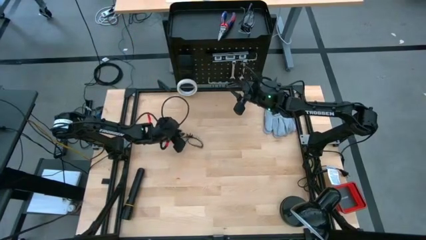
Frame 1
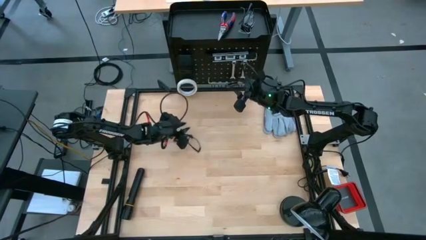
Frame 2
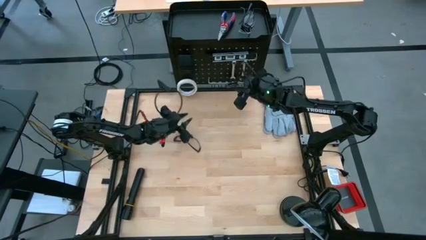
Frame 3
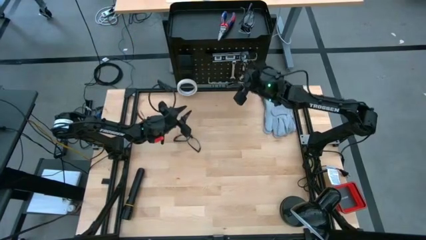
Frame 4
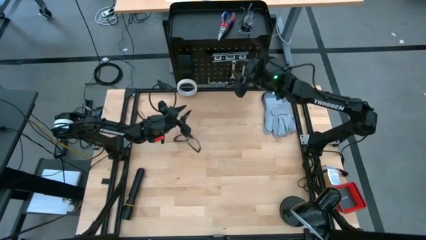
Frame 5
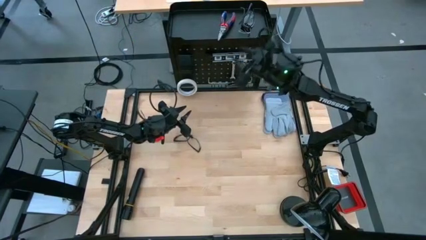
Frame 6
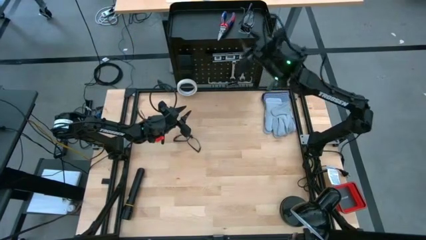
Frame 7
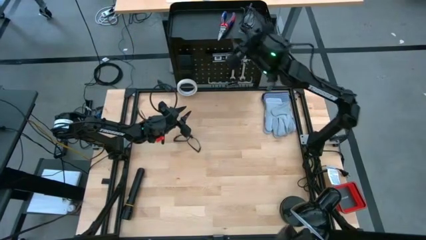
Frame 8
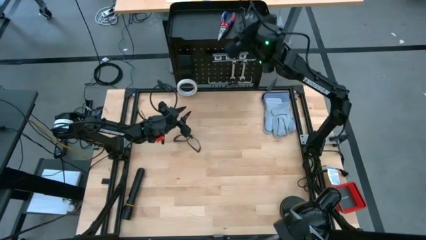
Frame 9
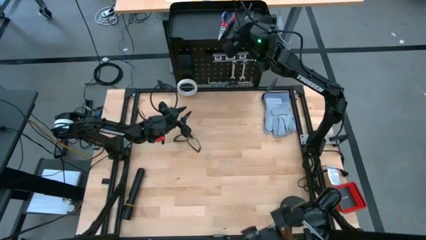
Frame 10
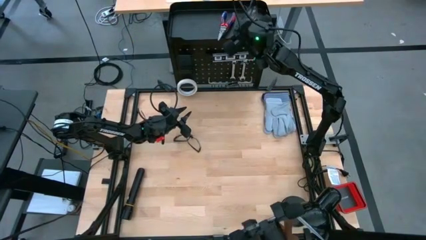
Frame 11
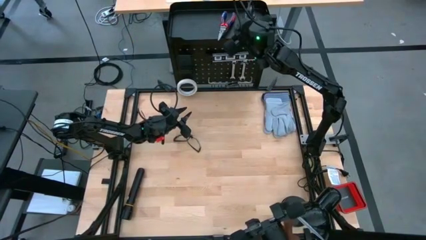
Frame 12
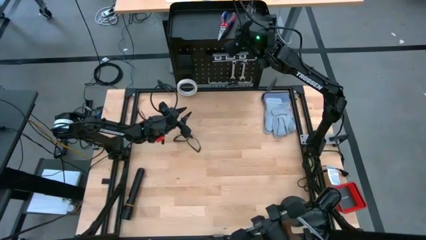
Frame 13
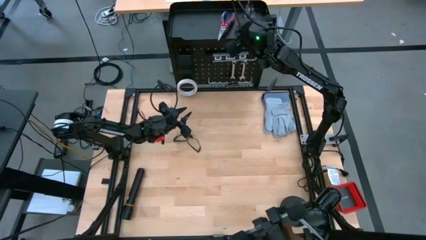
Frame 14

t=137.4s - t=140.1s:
Task: Hang tools onto peg board
Remove the black safety glasses from the black pegboard

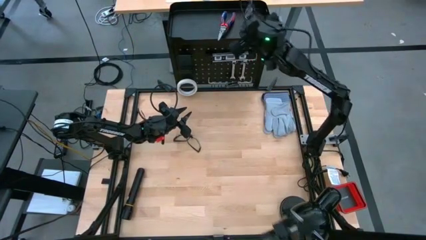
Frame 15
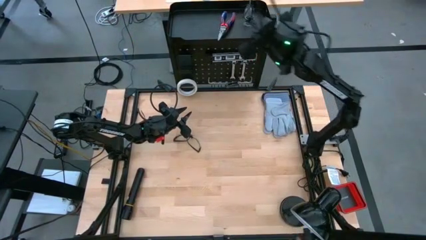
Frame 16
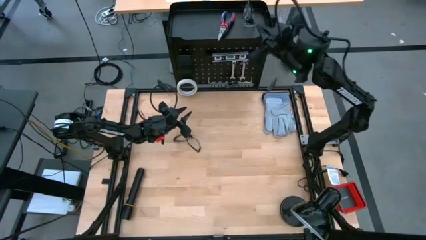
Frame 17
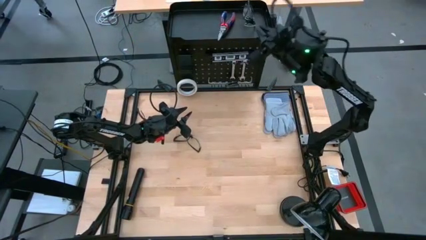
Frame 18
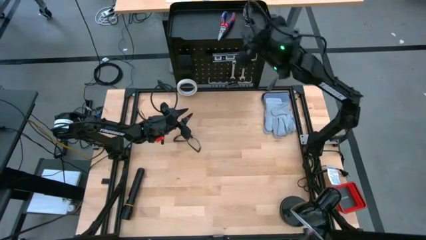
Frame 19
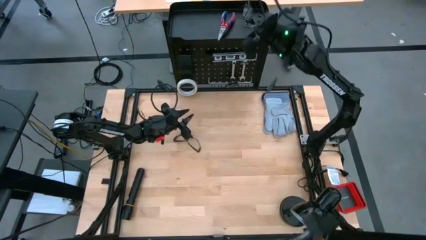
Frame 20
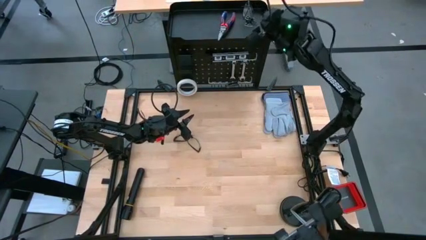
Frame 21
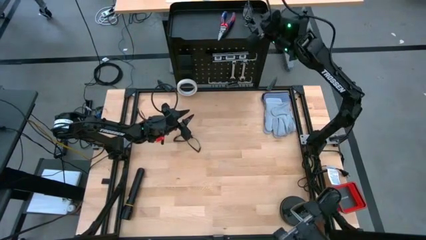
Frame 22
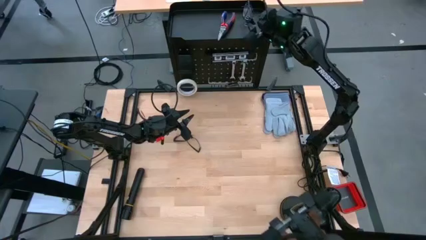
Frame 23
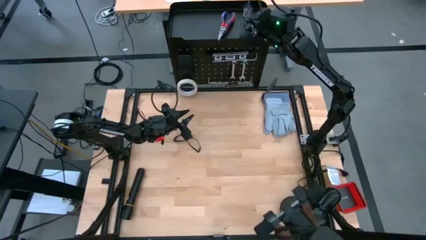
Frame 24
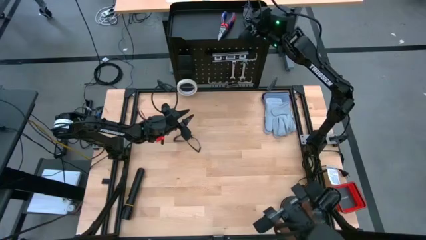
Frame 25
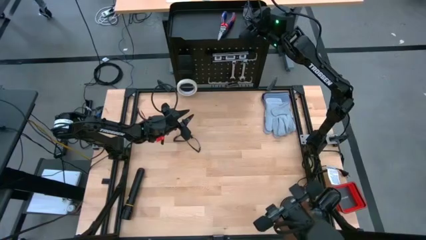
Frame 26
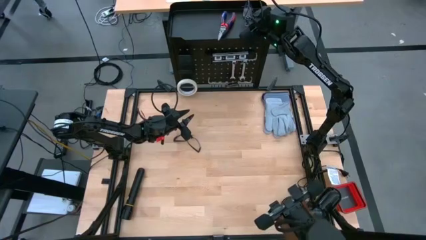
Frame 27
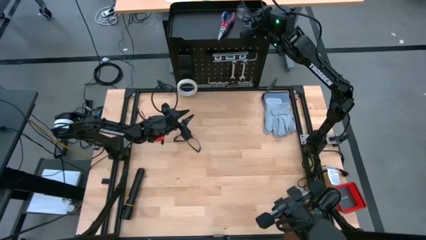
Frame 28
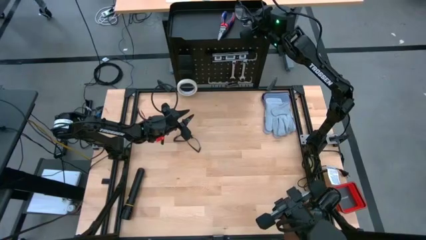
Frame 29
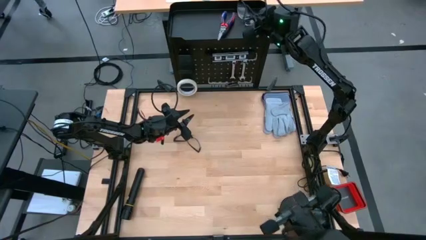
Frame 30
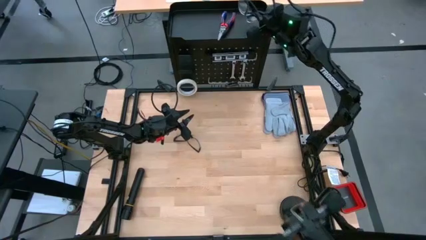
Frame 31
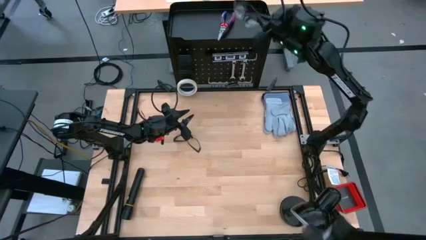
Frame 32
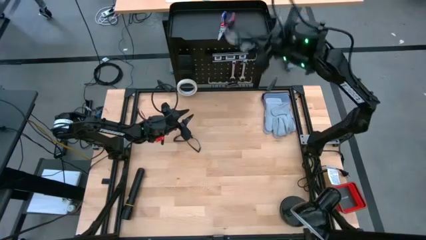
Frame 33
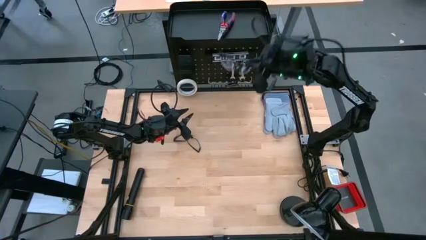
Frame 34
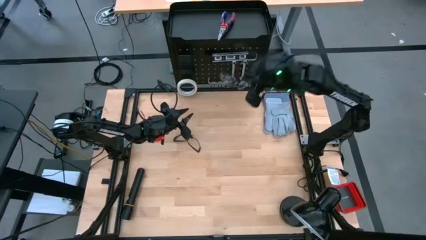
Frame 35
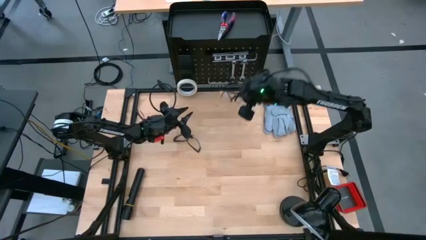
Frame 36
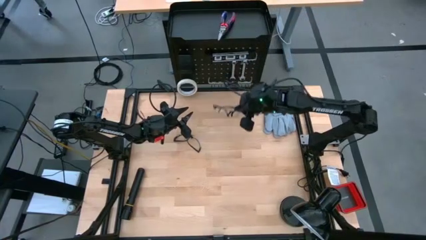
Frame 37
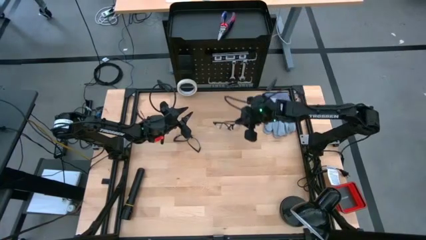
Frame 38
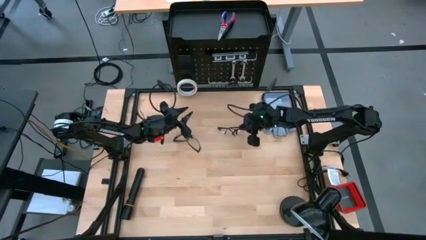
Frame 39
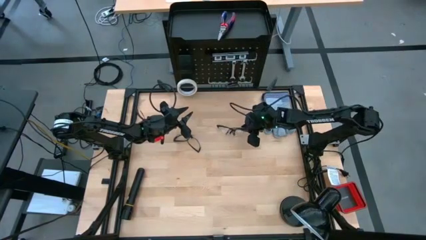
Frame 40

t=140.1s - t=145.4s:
Remove the black safety glasses from the black pegboard

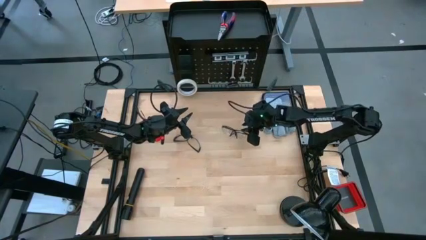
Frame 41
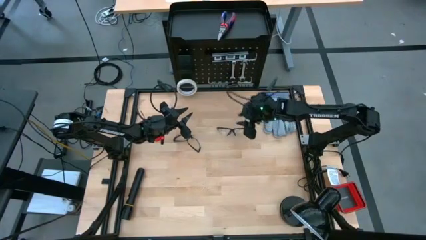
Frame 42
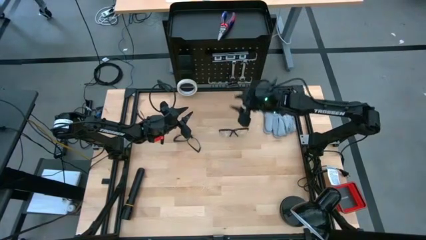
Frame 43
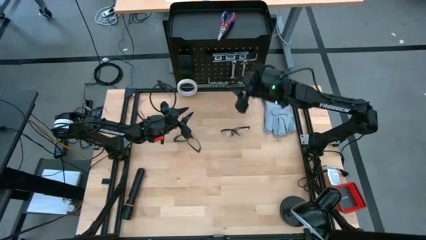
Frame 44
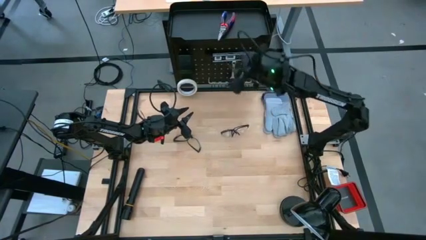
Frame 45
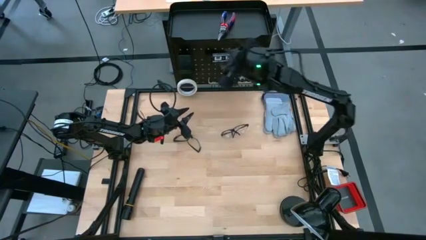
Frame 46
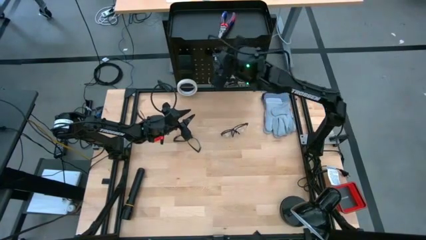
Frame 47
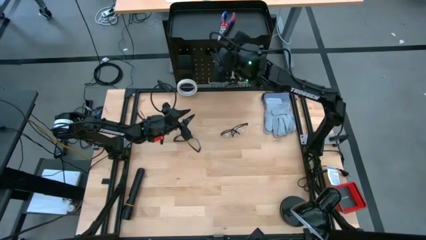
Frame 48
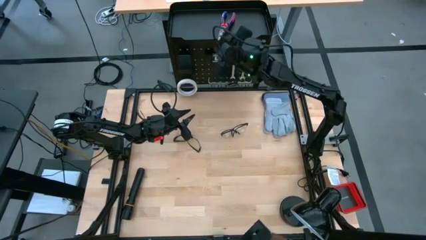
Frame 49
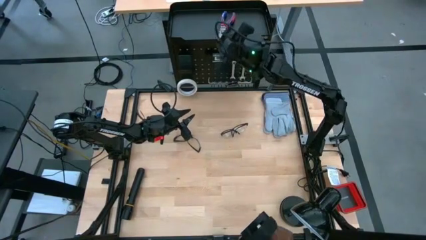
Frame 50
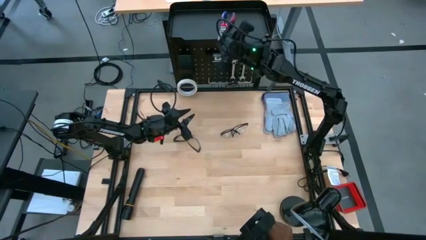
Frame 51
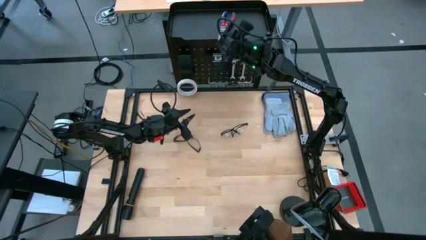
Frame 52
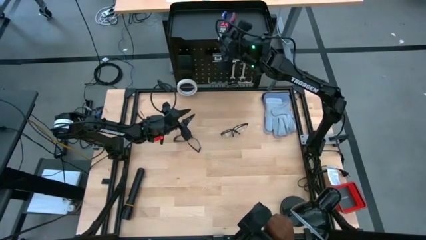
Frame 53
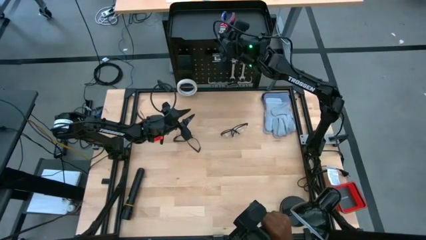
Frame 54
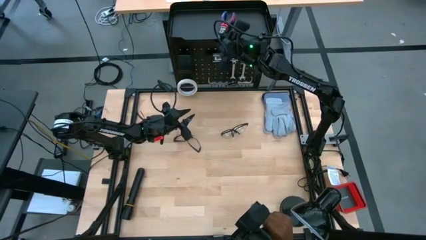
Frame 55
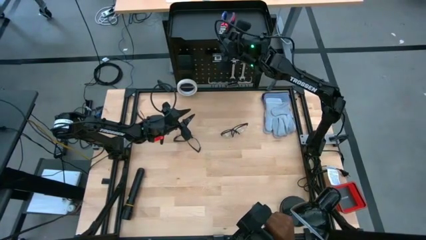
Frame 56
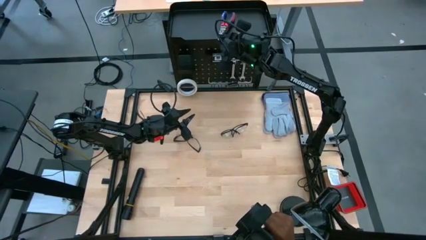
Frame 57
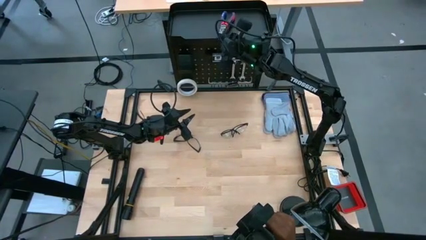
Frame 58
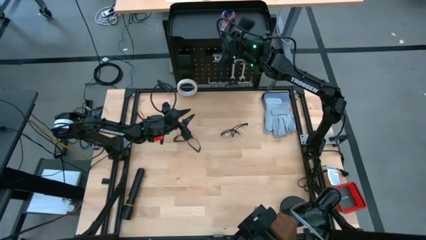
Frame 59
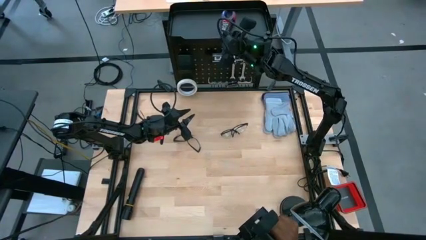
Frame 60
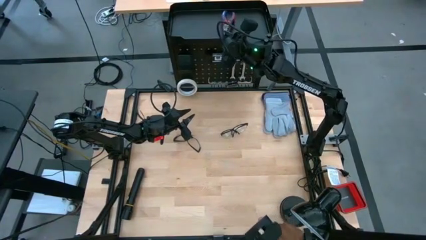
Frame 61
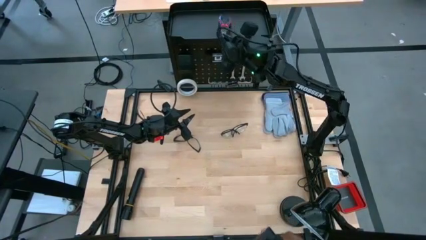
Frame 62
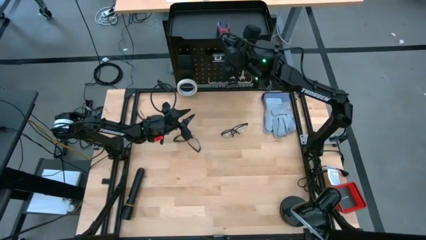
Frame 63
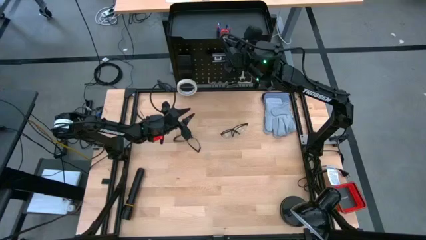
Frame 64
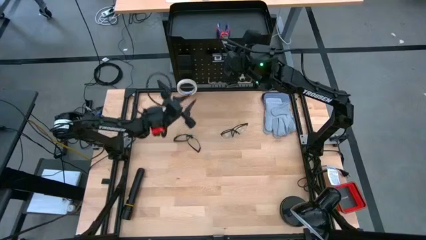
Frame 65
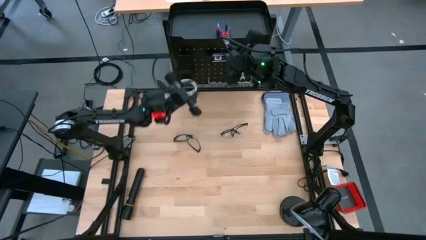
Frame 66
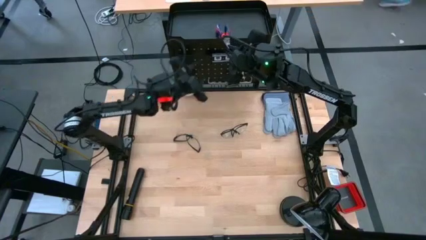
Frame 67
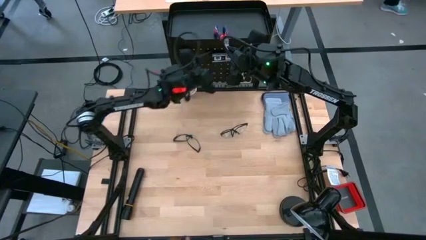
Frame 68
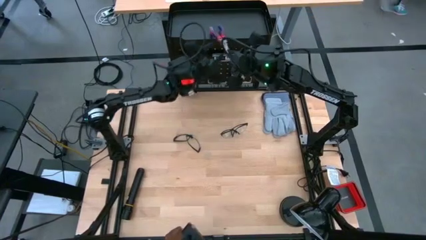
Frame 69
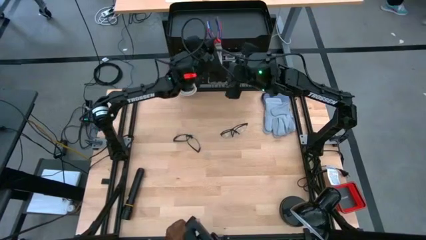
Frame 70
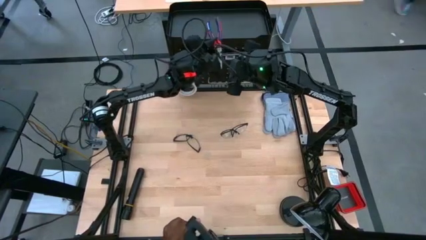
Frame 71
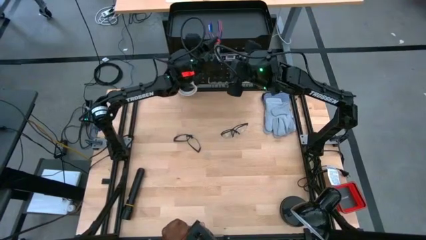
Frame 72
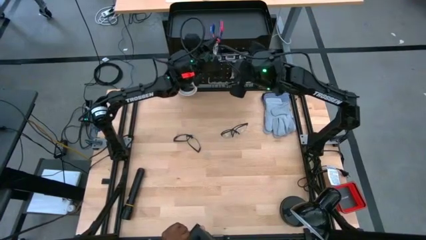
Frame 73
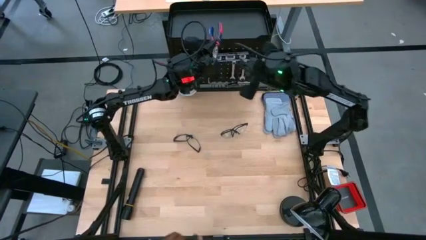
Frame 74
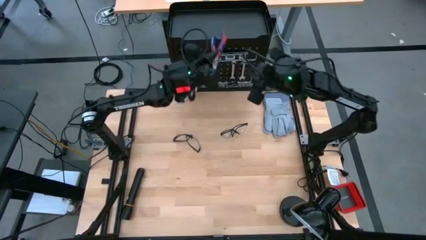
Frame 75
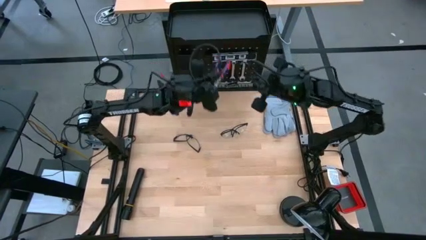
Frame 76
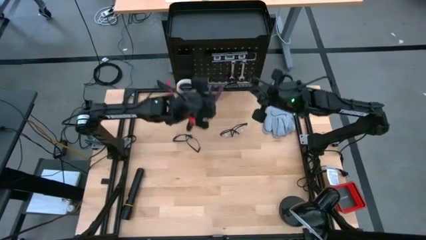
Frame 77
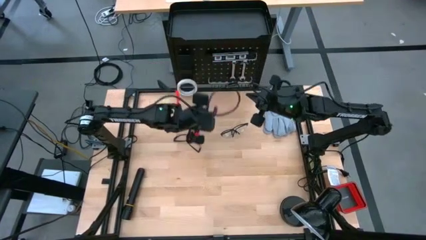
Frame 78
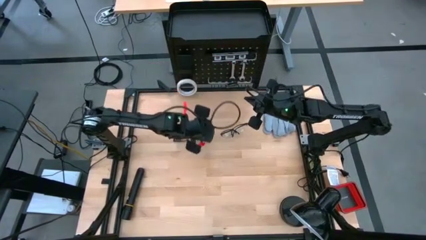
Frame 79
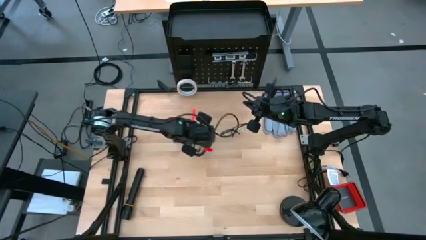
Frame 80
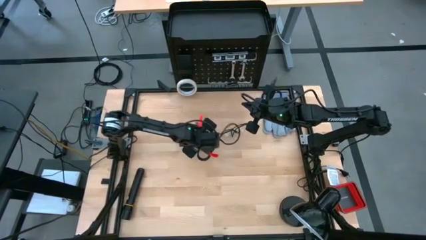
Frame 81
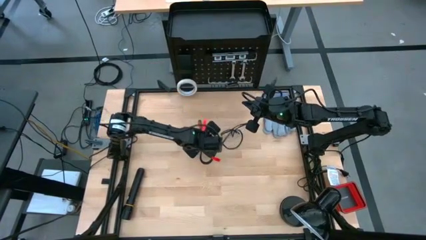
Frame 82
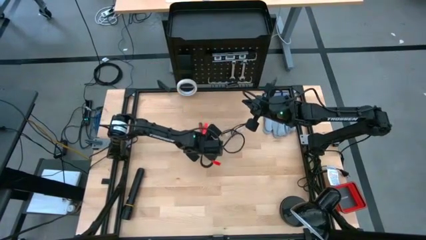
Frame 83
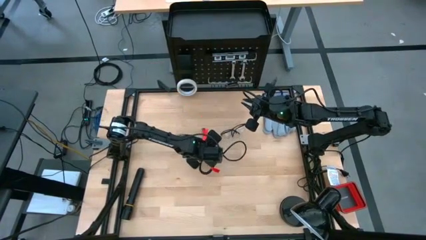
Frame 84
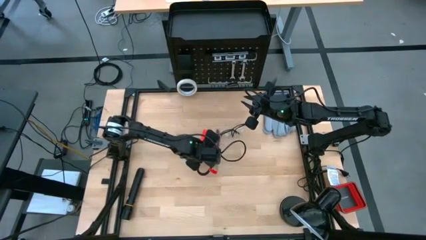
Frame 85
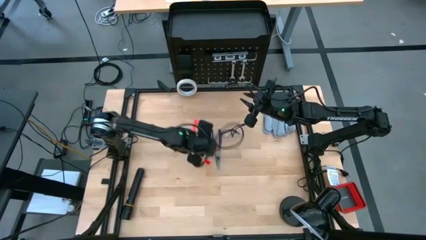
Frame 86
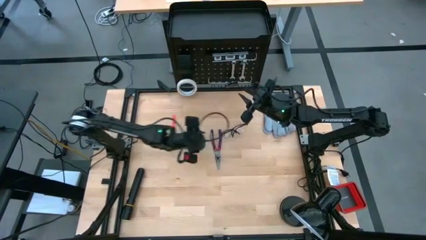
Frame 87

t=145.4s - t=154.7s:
Remove the blue-orange pliers from the black pegboard
